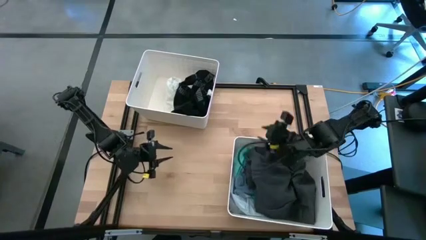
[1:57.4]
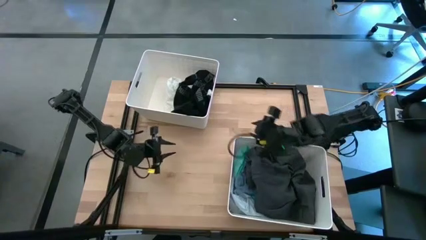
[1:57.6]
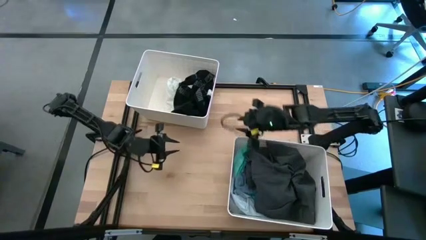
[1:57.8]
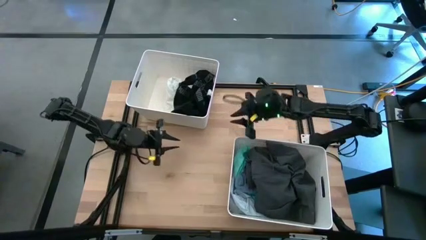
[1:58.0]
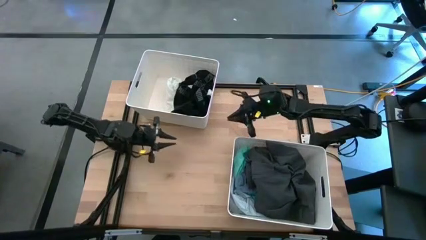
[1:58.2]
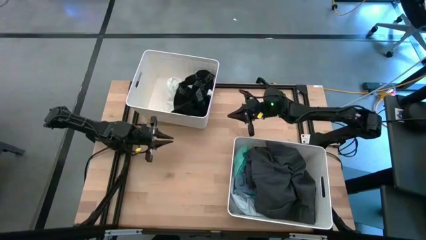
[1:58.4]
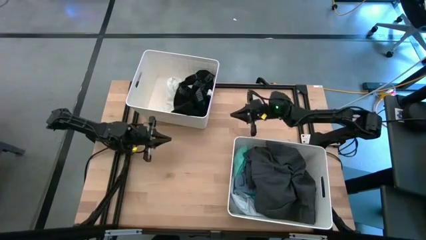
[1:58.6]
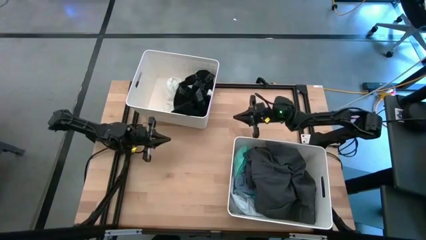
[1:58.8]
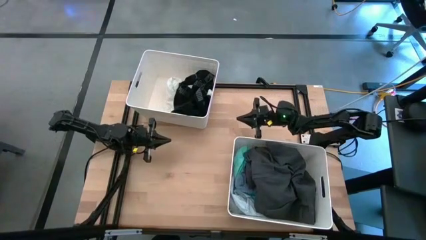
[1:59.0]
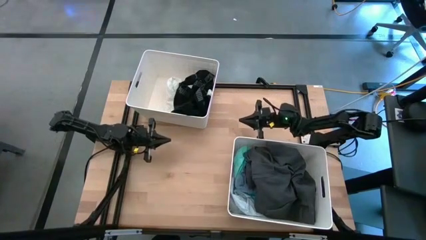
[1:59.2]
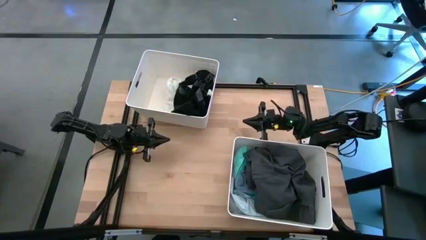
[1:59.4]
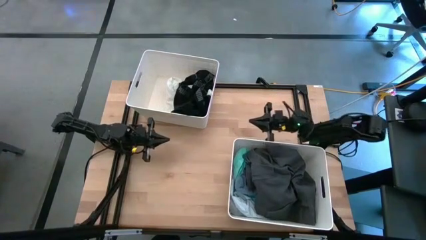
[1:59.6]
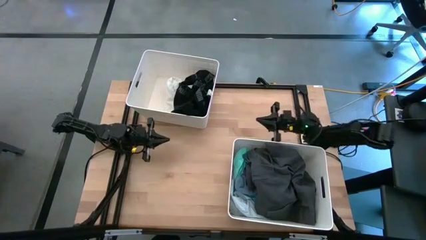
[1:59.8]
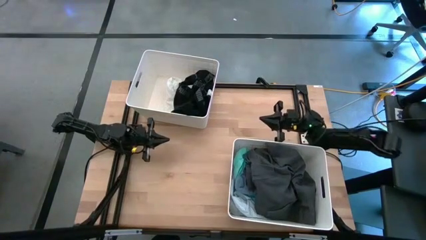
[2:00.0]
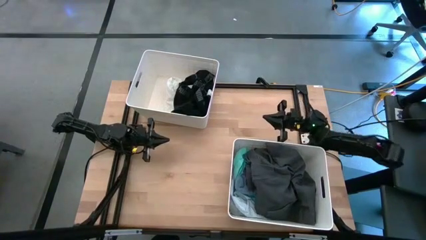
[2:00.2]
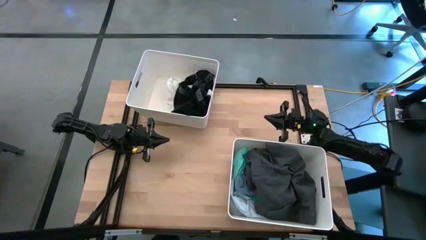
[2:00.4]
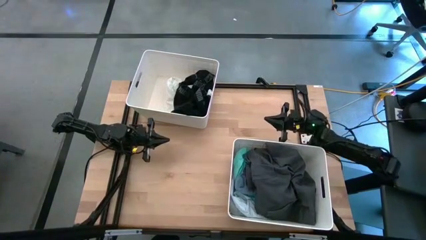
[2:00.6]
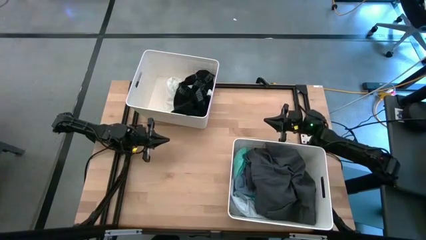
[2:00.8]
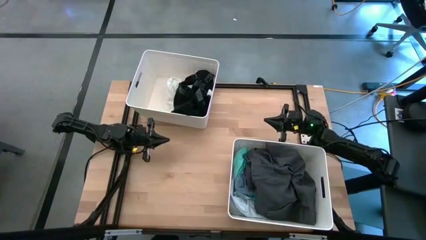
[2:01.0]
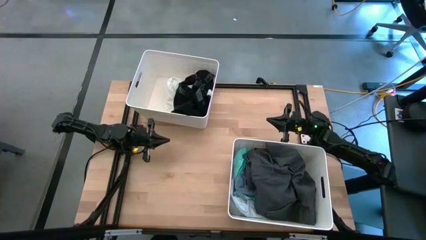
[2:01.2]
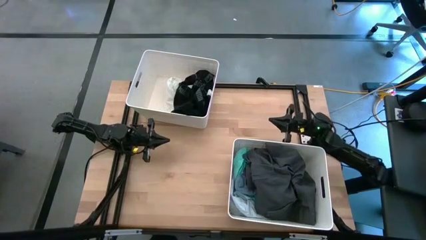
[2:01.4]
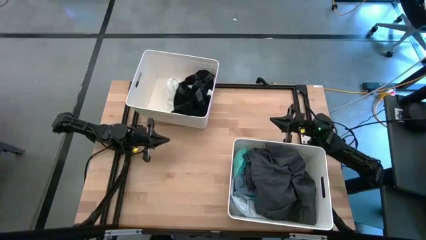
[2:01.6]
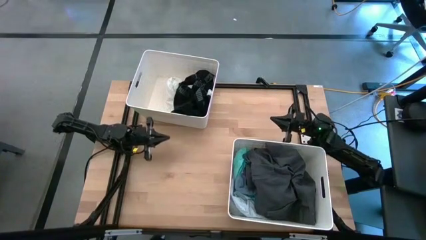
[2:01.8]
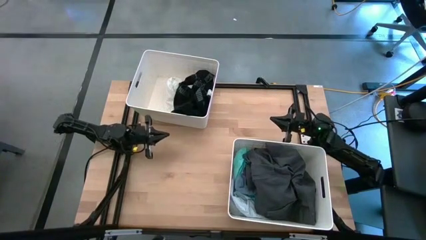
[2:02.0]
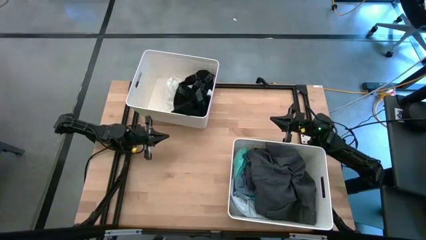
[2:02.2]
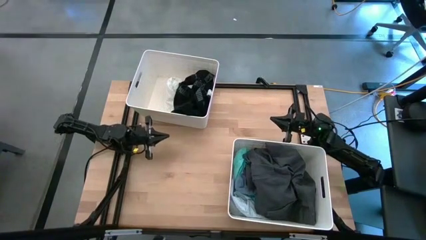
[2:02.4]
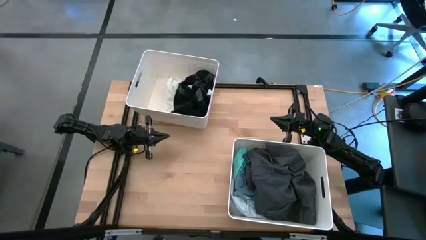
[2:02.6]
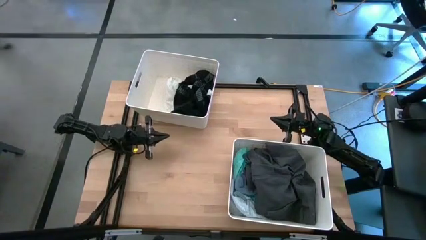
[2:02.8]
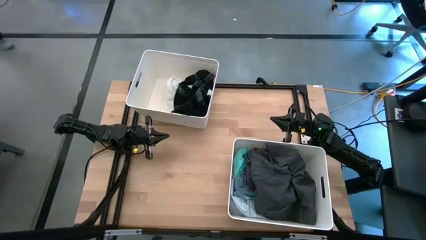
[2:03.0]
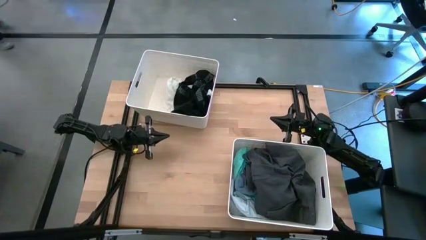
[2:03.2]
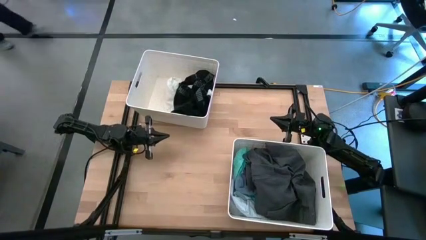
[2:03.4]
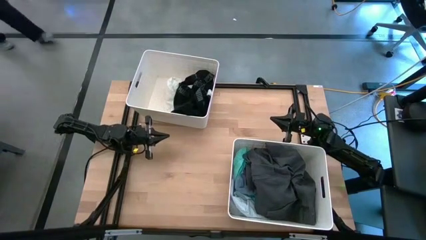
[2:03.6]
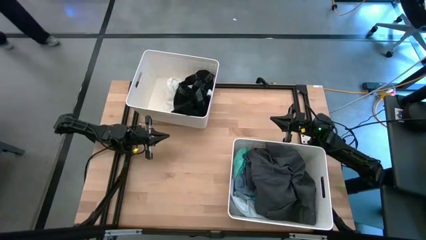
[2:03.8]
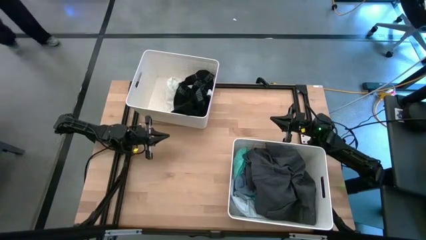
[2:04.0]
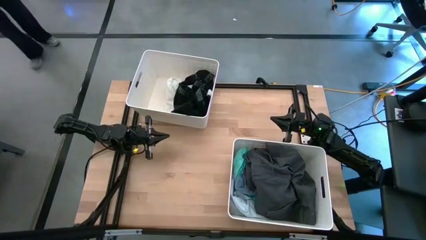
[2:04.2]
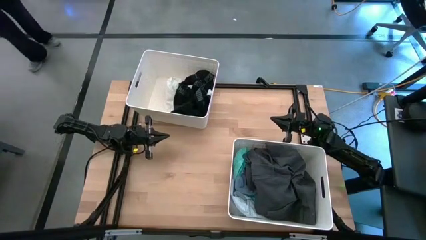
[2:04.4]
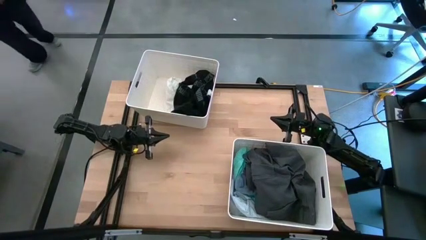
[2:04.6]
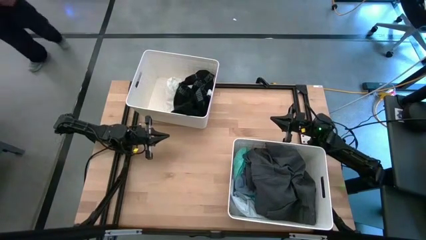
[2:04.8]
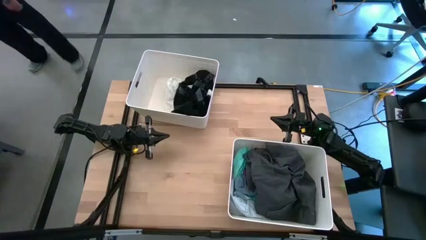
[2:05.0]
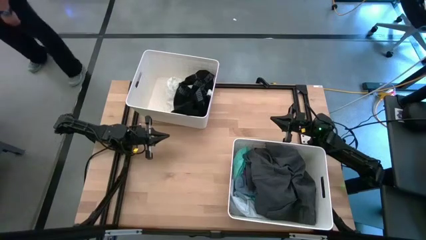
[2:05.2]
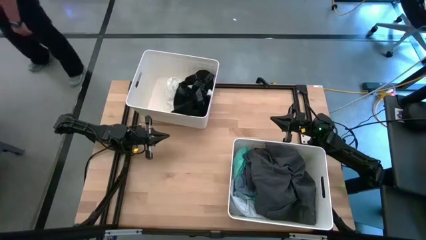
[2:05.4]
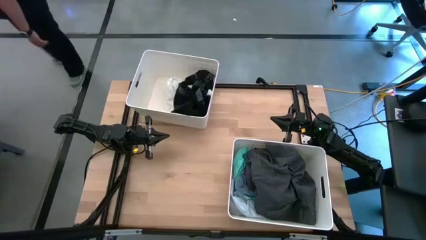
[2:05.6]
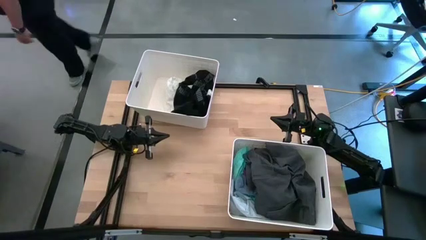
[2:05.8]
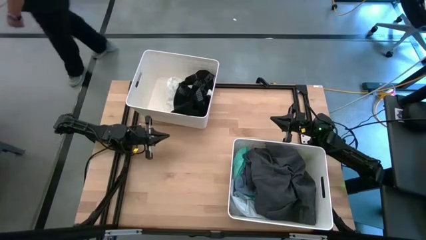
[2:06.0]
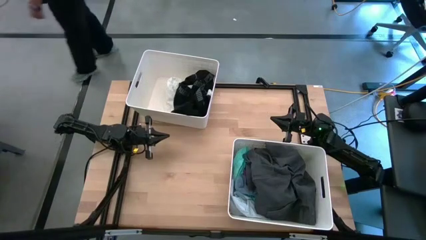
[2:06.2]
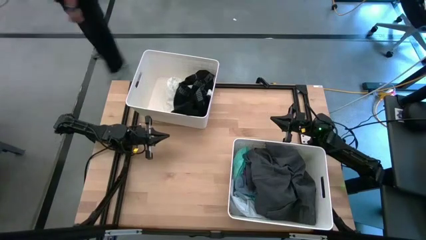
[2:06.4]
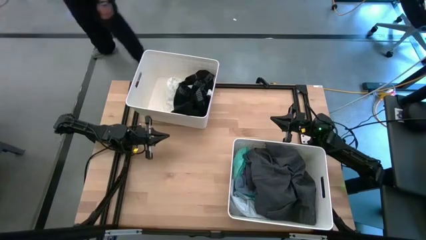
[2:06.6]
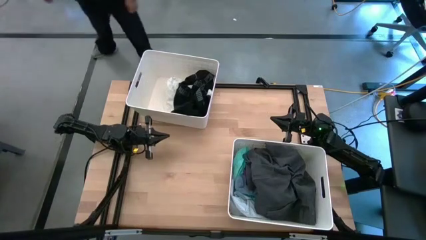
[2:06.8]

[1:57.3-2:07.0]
Task: Sort clothes
Return to Home Position

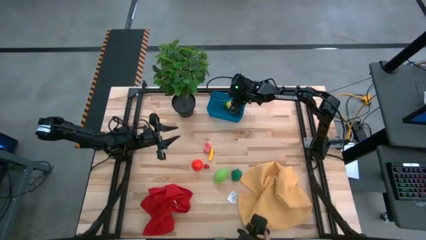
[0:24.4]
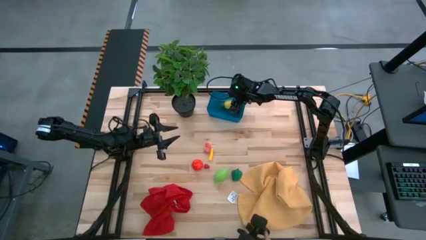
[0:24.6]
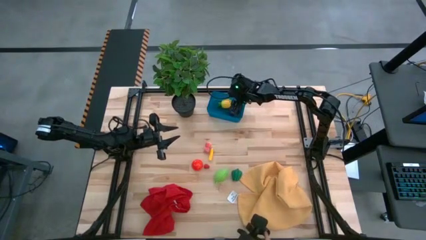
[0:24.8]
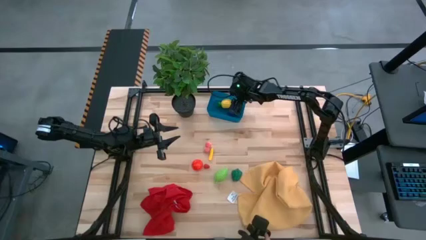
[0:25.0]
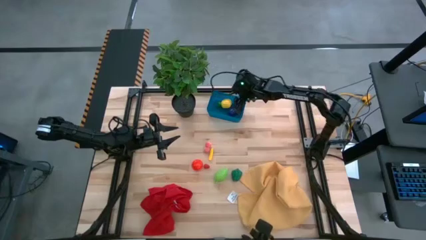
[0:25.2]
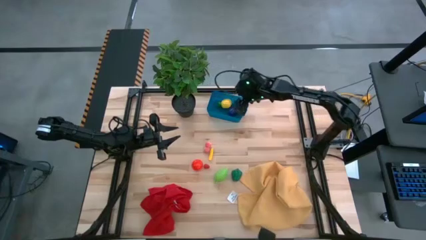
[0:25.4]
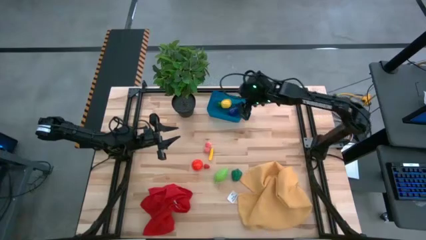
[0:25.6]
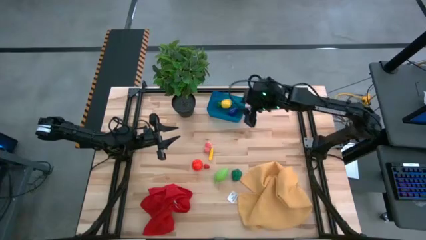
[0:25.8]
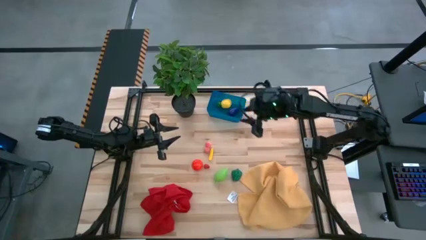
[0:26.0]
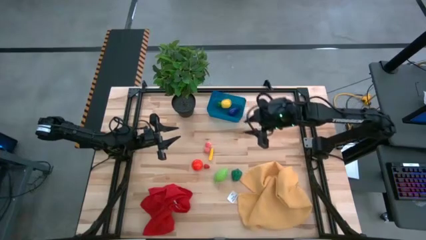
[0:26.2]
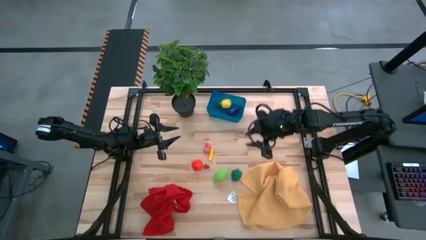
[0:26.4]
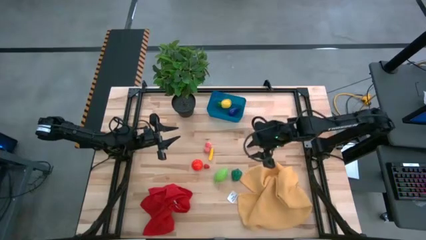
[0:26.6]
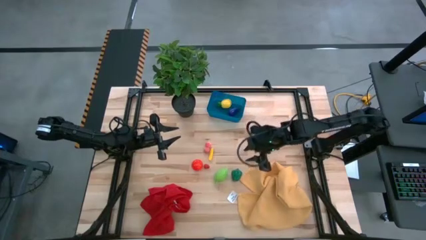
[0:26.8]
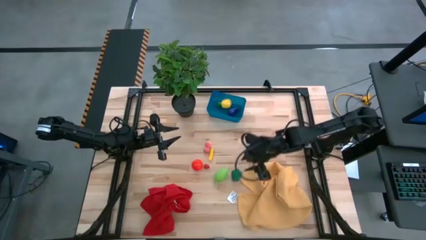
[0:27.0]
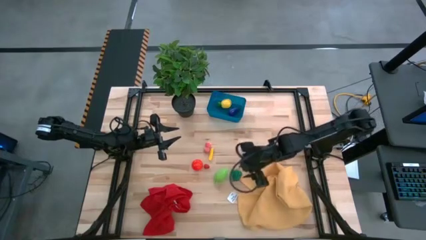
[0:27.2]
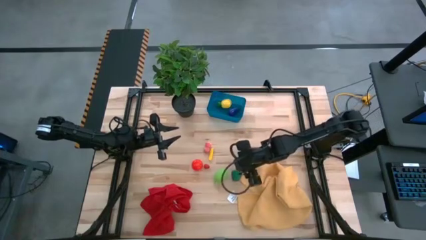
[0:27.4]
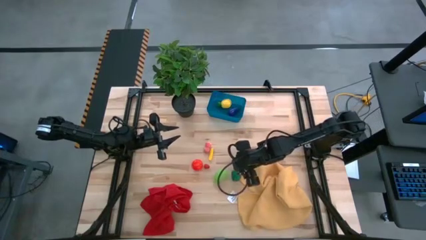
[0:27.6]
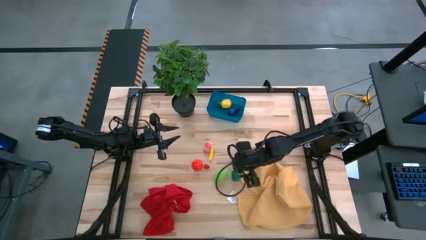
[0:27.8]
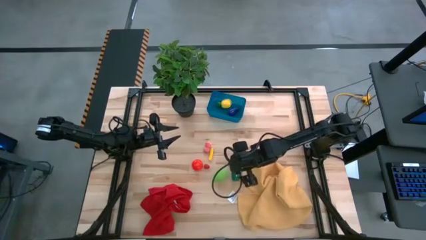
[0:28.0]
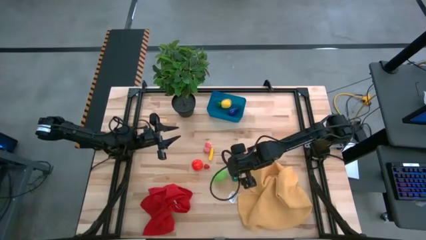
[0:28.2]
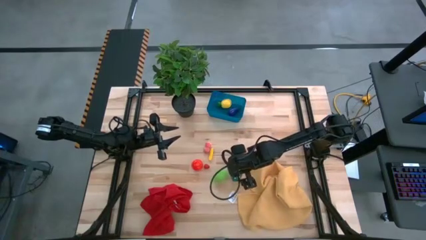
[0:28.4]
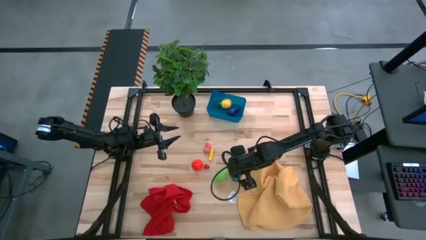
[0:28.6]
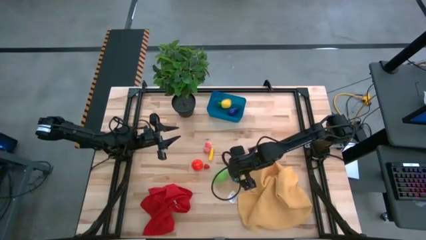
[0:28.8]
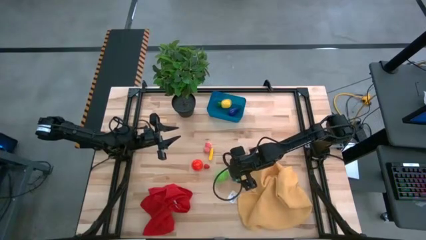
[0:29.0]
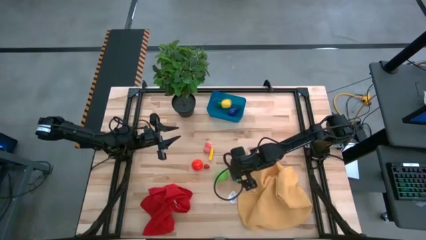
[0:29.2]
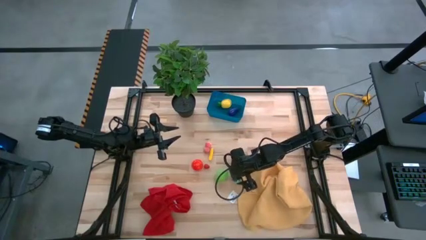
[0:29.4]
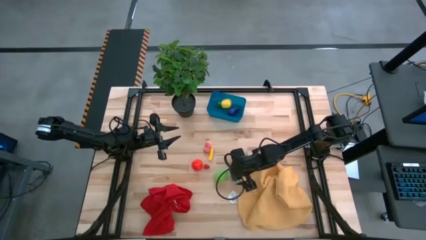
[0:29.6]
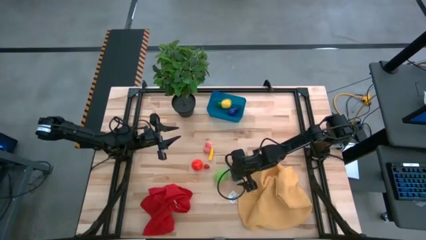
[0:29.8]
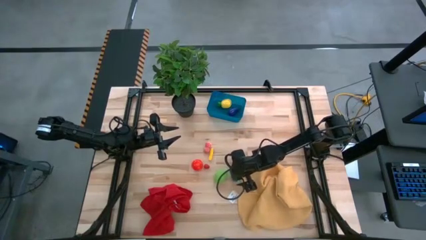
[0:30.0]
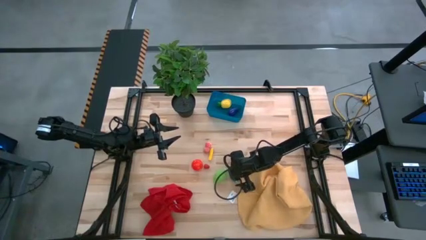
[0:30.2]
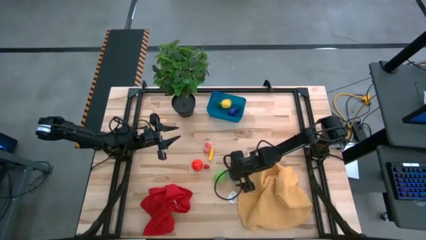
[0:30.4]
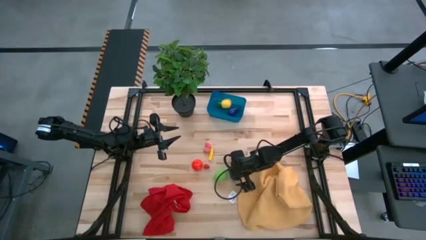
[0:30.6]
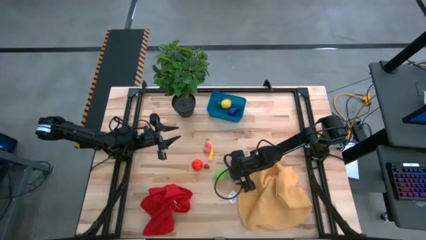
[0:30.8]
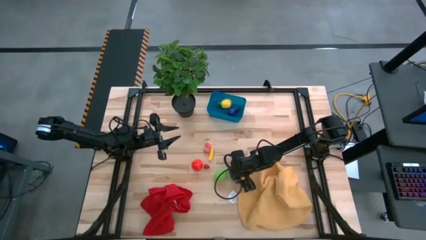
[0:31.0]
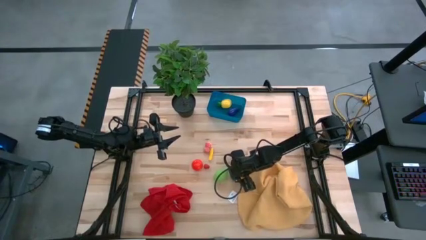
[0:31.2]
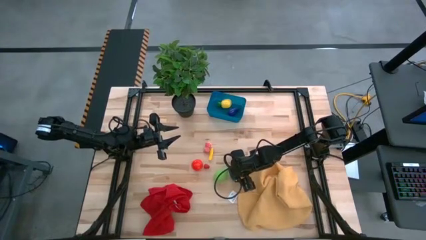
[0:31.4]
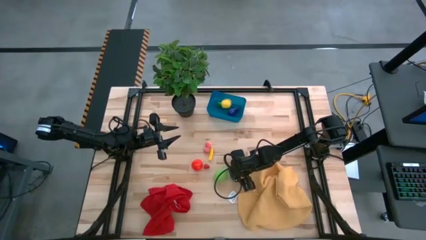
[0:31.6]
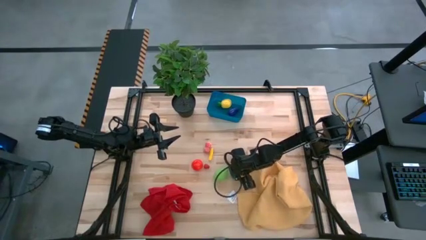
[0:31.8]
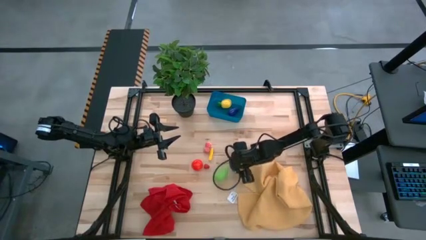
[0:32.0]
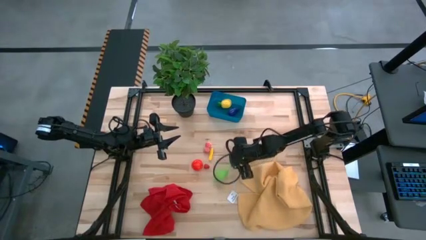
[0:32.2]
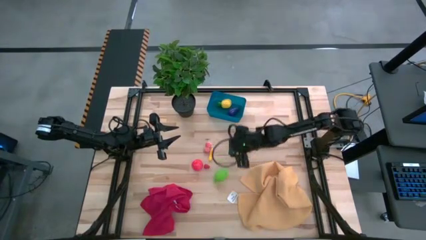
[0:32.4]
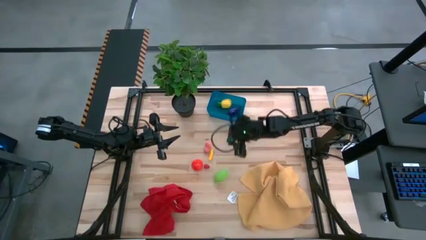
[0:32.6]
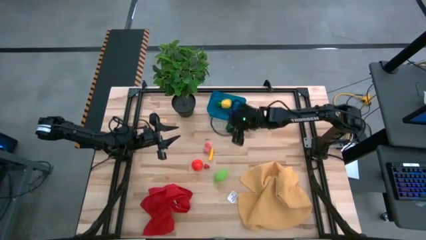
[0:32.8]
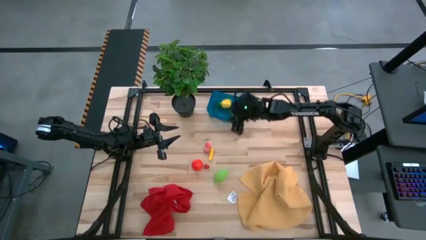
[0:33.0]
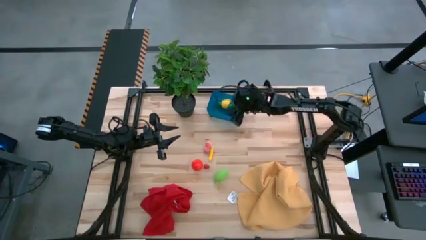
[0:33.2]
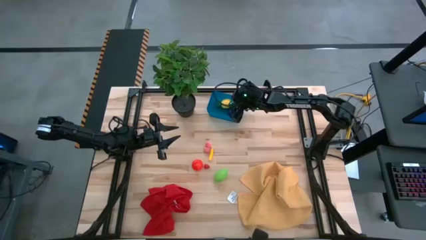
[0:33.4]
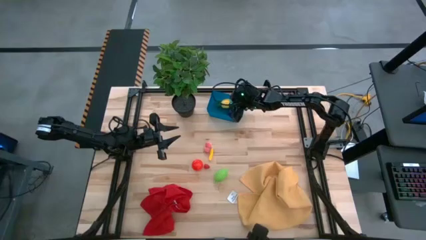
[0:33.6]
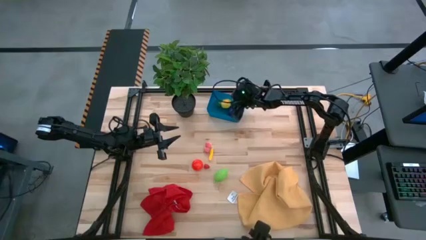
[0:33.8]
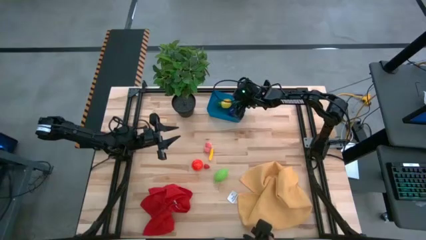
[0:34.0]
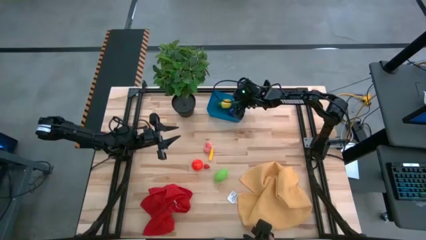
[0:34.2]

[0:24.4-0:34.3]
Task: Pick and placing Produce into tupperware
Put the green bell pepper into the blue bin
